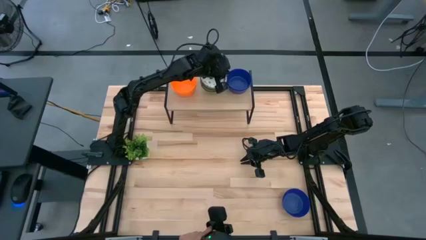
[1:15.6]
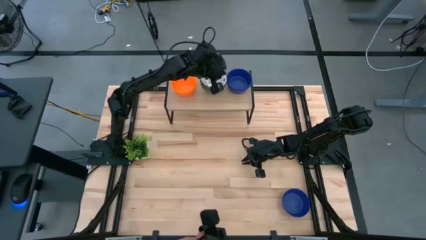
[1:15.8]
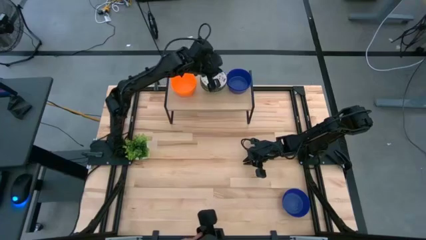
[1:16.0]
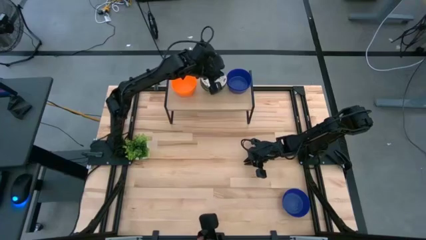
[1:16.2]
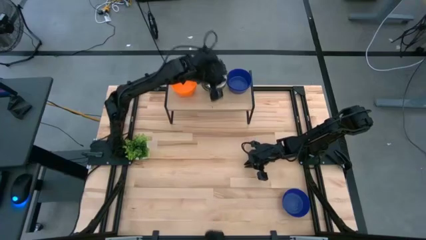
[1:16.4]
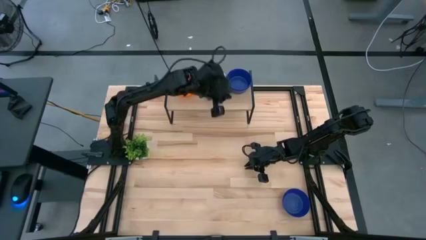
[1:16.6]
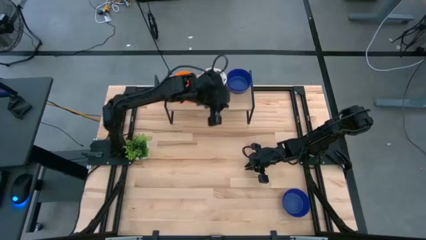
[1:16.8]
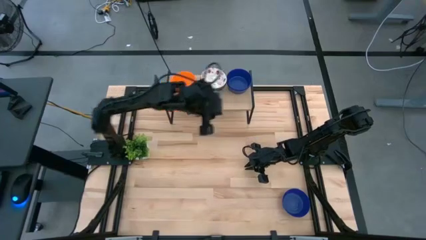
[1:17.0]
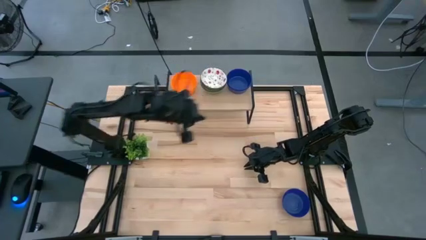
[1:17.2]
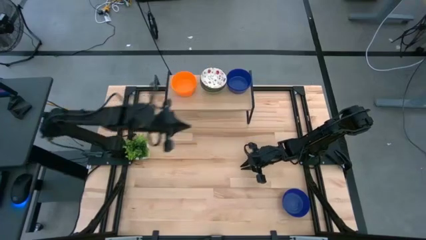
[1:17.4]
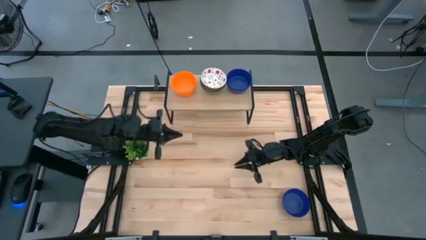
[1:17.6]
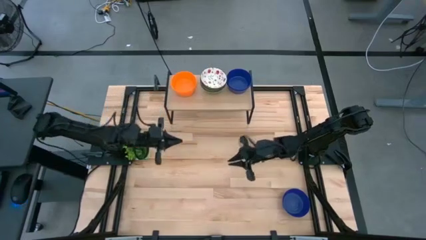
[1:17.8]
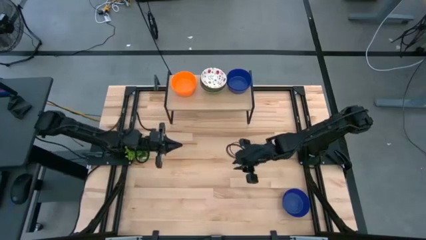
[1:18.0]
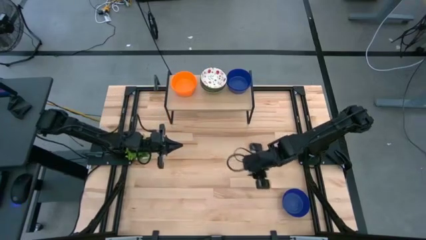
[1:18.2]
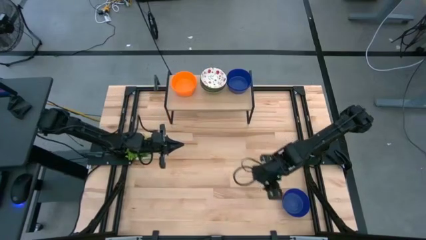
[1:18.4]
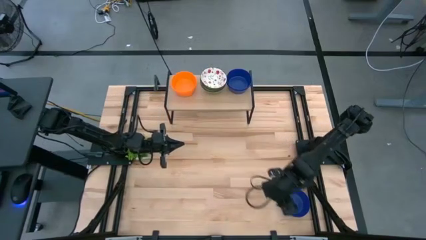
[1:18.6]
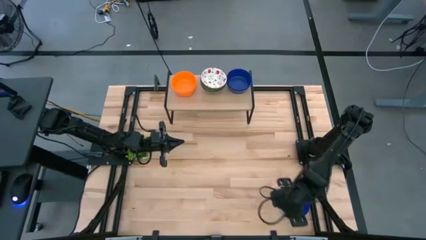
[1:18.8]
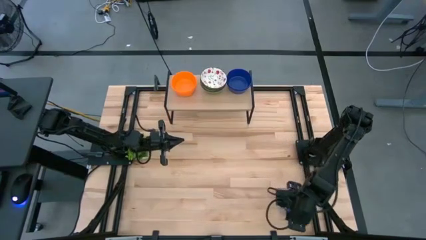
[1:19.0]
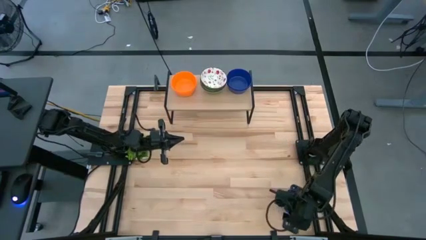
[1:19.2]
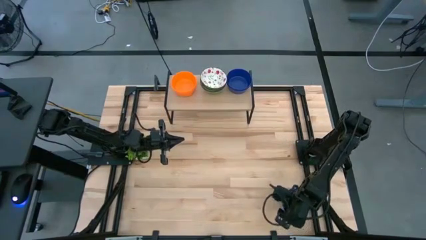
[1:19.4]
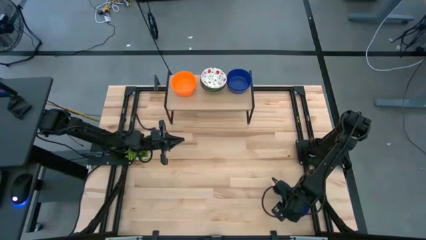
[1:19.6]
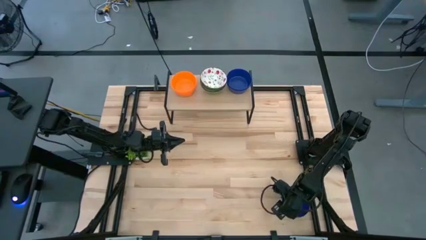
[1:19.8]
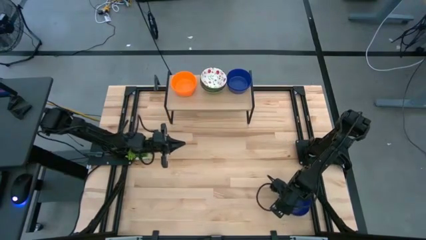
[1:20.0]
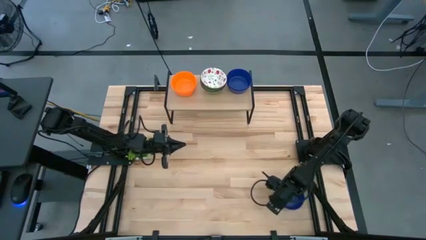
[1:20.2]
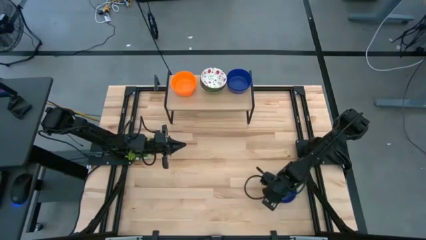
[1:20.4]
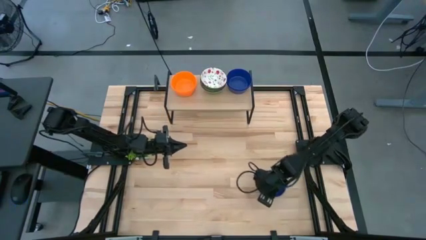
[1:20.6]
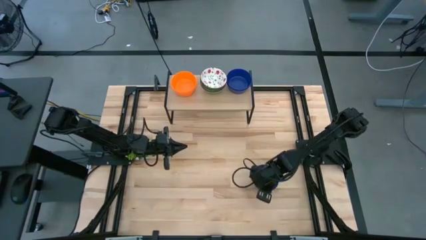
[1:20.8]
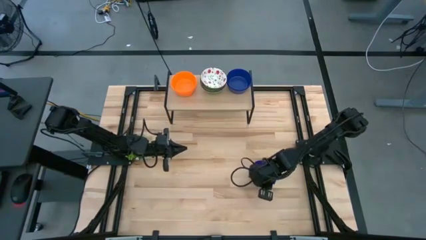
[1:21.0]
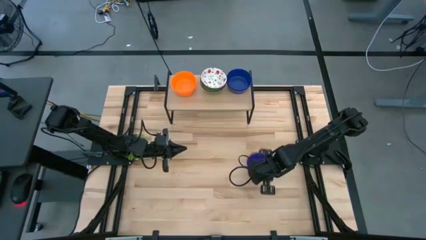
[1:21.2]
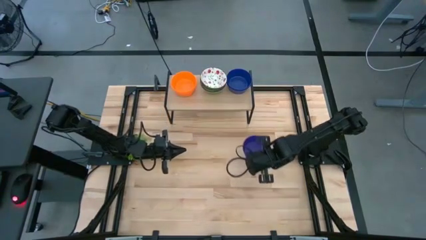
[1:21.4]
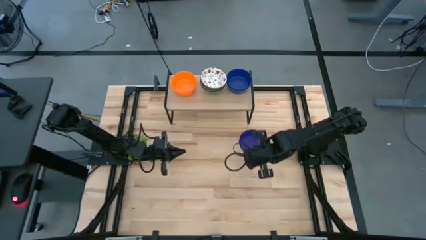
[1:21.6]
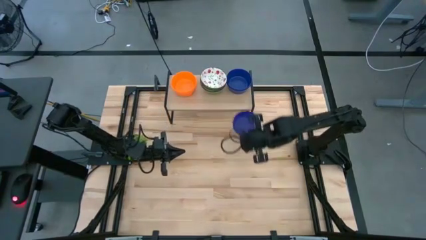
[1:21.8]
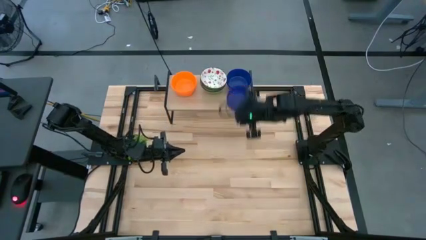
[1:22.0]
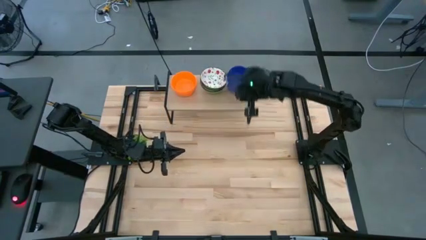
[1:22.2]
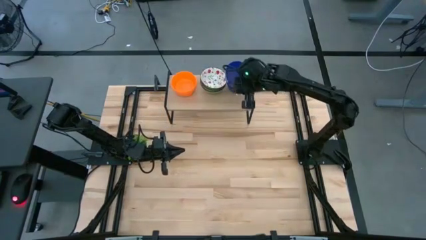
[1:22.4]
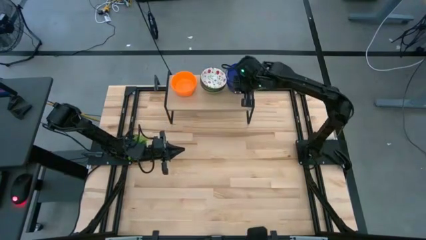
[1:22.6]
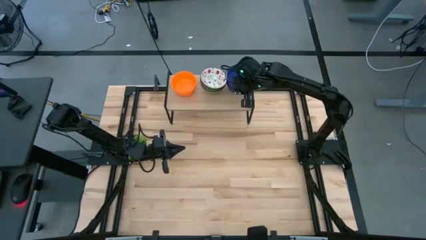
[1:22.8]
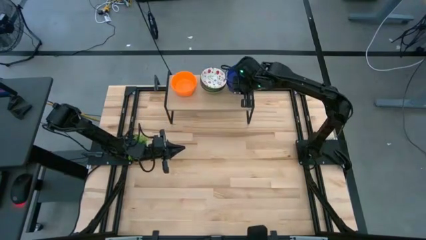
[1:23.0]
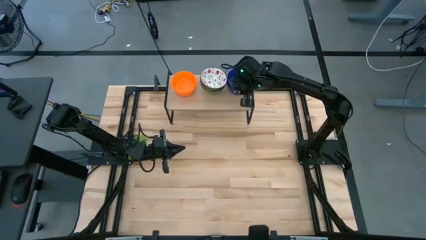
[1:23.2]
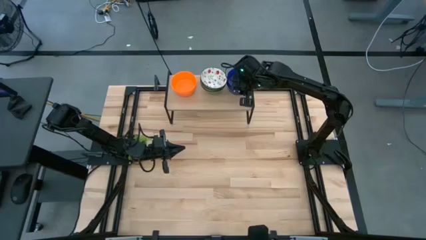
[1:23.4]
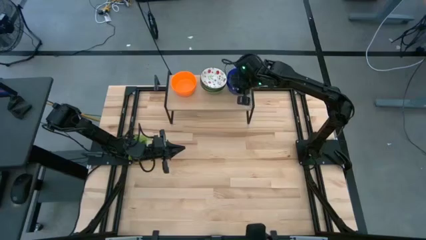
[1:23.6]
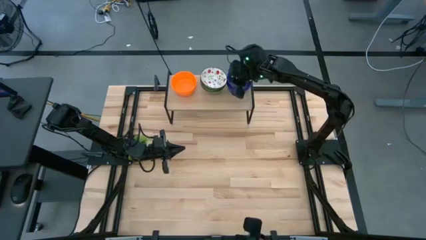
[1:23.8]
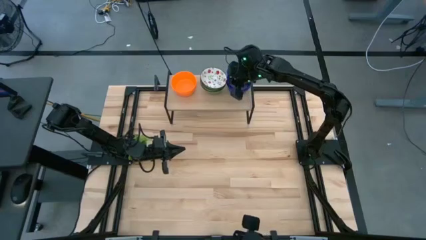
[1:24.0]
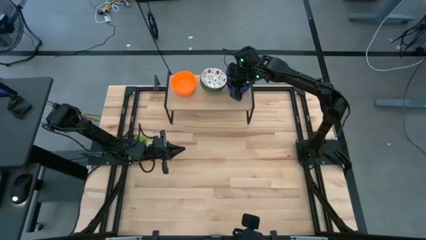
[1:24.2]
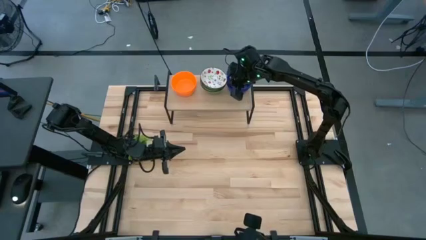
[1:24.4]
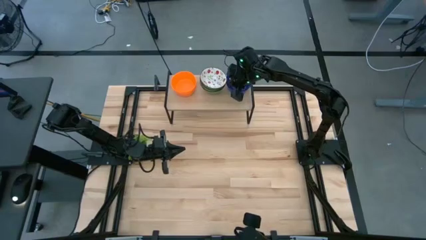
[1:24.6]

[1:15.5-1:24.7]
Task: Pick & Place Mini bowls
Stack the blue bowl on top of the other blue bowl on the shelf

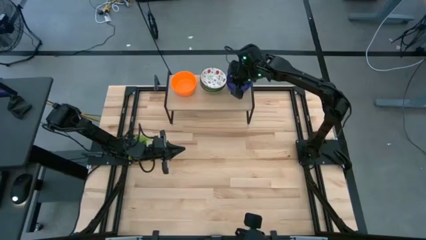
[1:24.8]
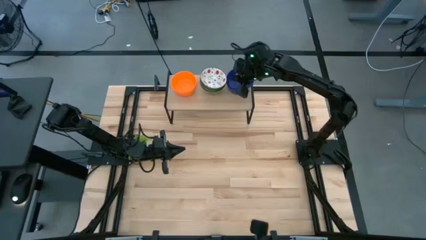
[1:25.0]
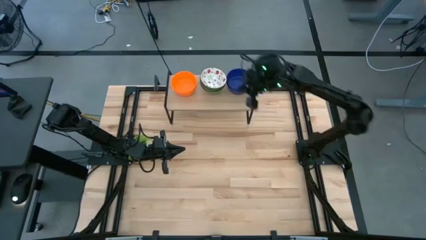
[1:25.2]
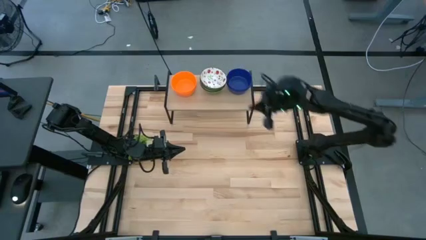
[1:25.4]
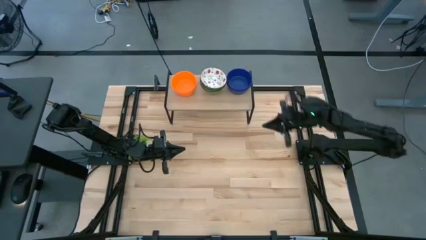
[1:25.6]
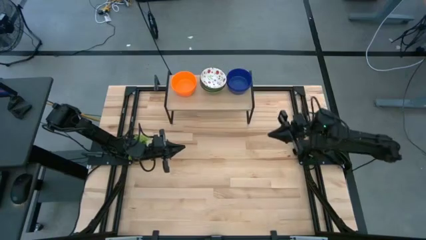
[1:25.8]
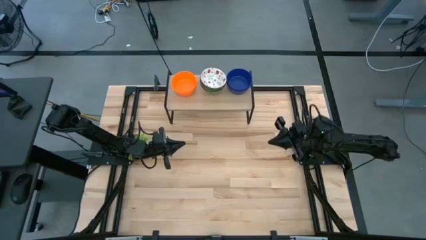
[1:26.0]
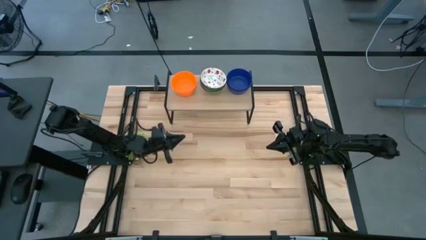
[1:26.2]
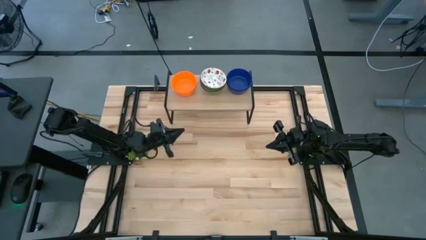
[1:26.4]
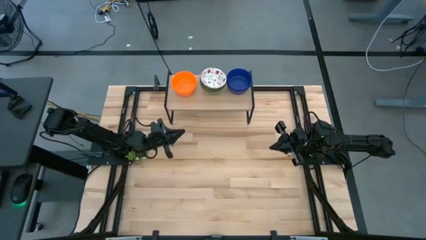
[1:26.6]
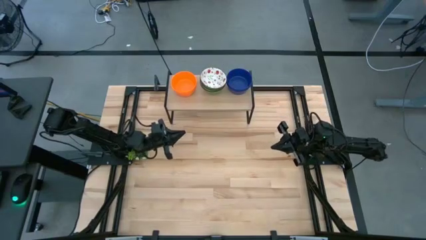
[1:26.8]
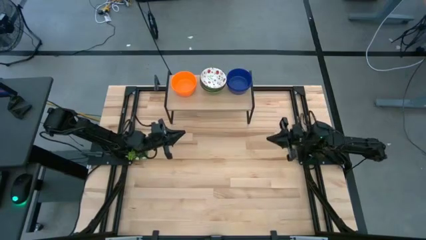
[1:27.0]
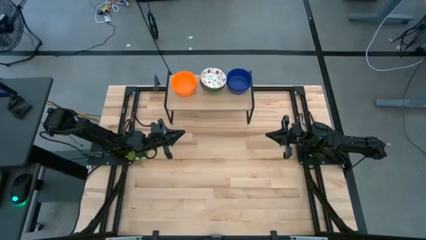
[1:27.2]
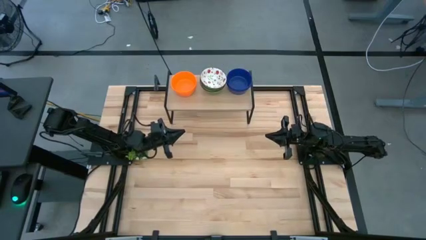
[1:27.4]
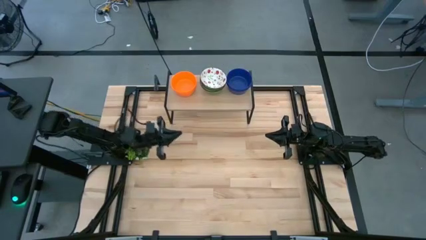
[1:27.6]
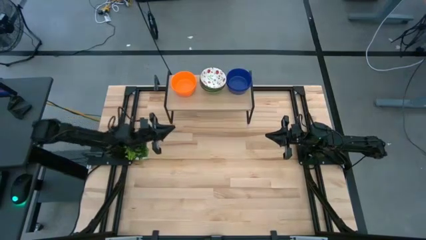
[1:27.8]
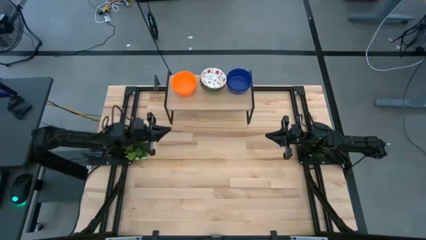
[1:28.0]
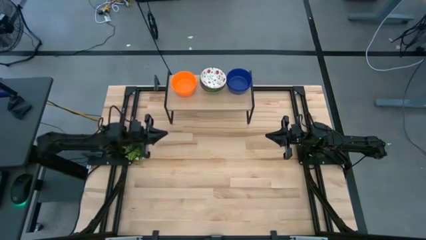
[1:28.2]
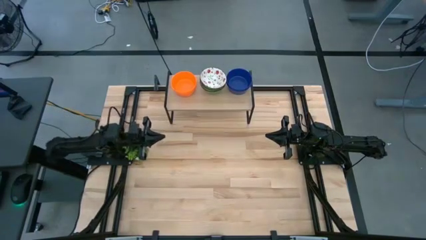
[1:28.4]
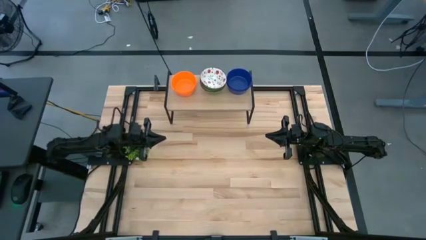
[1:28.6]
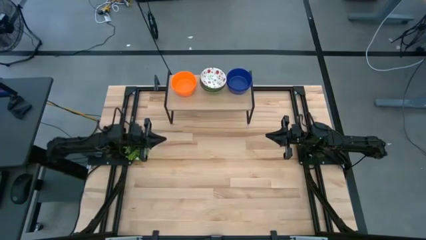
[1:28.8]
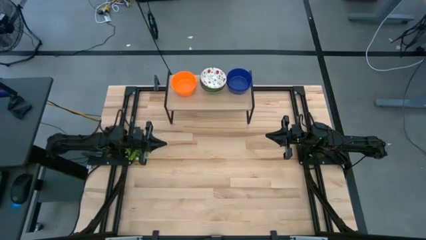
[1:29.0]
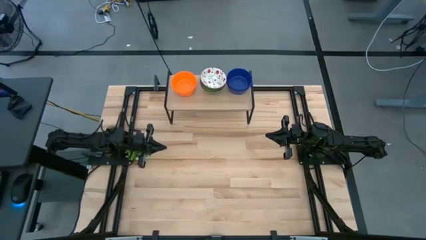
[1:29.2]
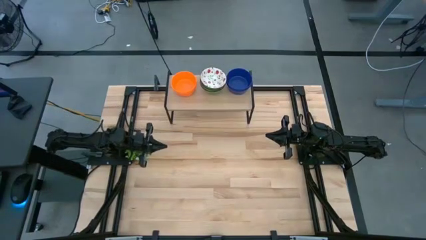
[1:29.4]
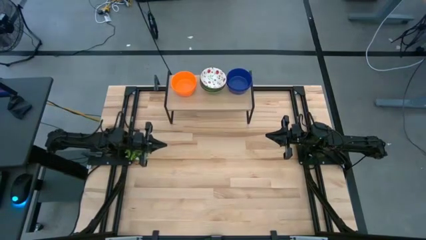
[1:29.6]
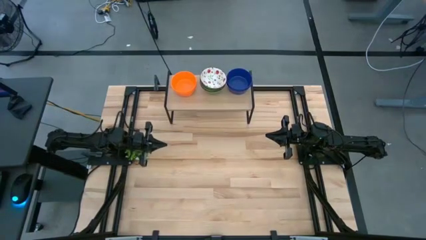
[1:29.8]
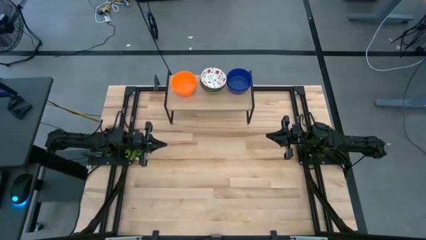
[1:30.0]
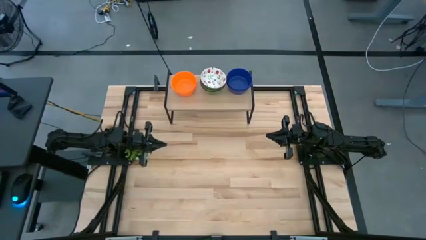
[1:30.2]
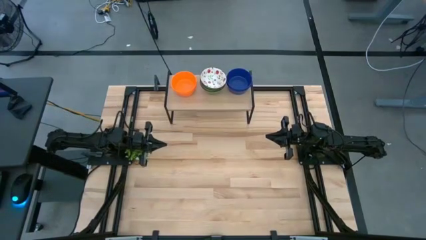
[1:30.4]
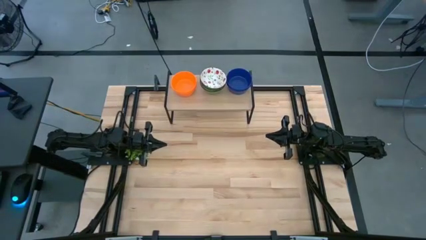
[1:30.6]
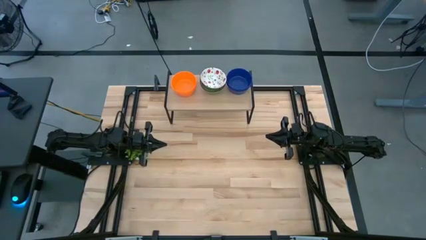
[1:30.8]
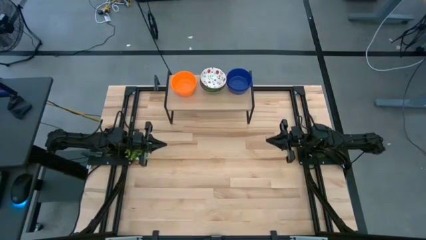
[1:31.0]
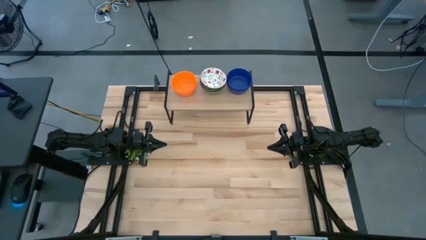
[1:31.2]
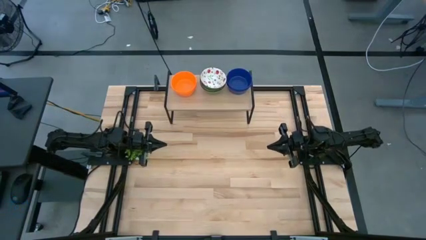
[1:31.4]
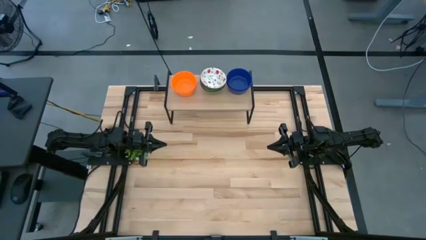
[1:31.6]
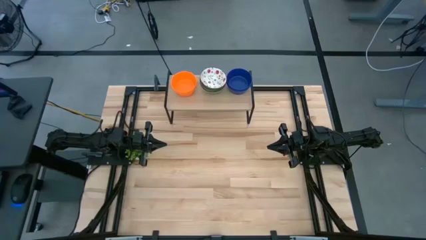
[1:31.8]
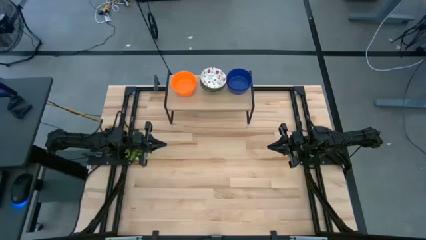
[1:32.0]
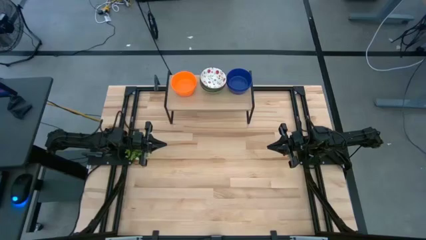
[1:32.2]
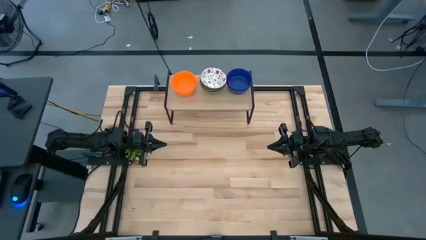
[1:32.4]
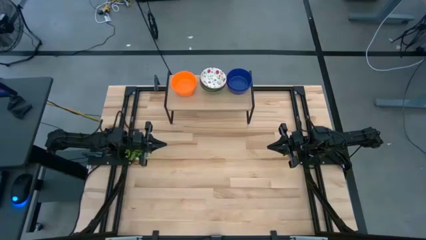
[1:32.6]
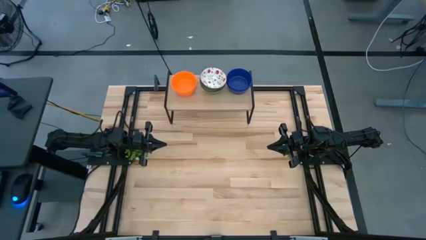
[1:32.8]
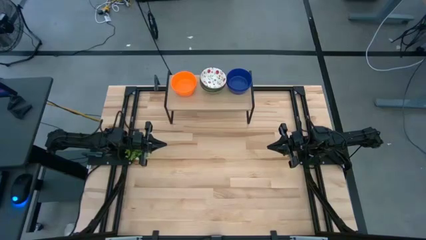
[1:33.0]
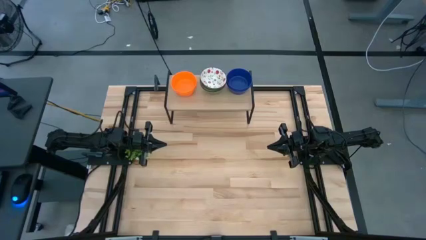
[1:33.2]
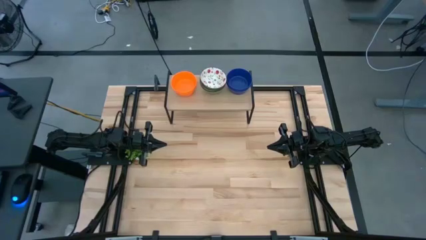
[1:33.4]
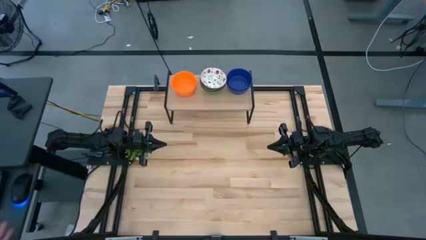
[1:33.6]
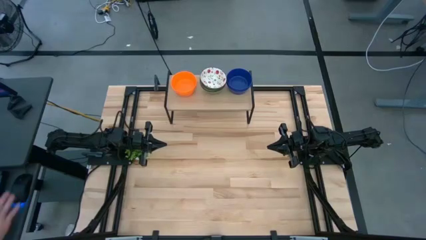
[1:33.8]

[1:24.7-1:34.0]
Return to Home Position
